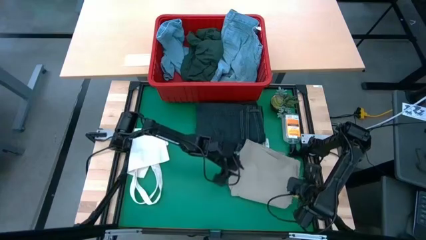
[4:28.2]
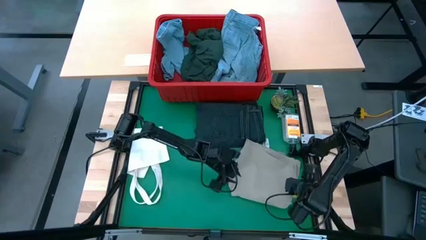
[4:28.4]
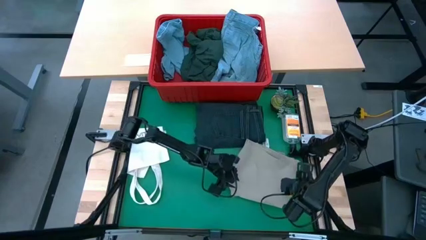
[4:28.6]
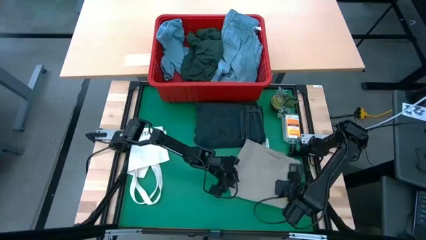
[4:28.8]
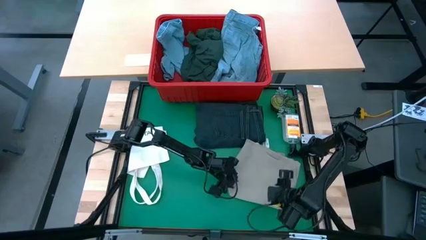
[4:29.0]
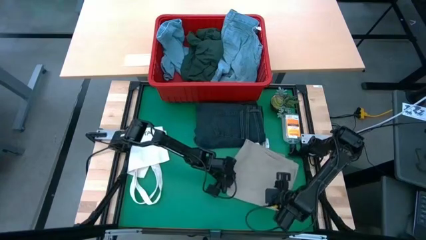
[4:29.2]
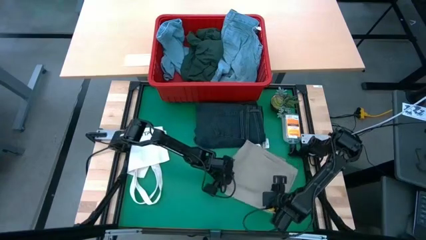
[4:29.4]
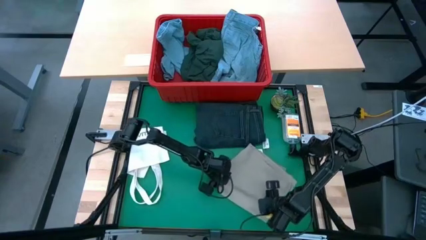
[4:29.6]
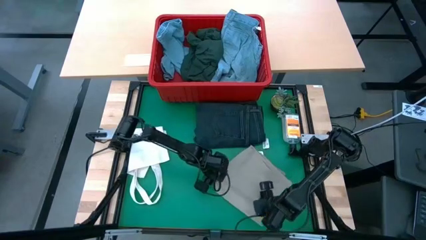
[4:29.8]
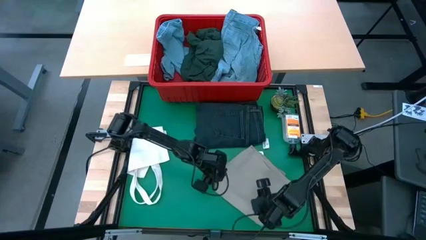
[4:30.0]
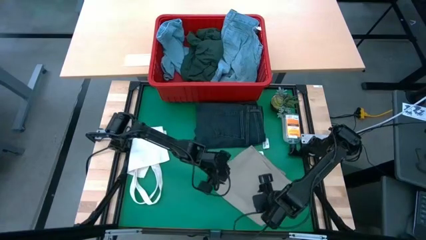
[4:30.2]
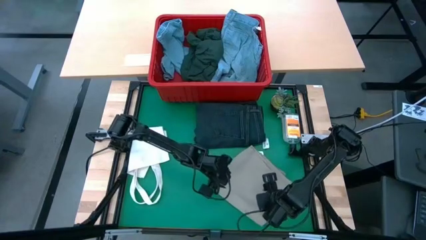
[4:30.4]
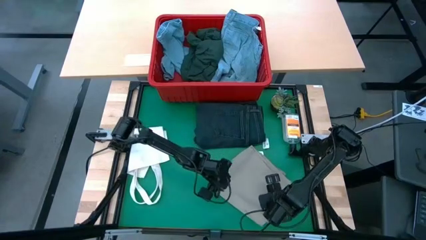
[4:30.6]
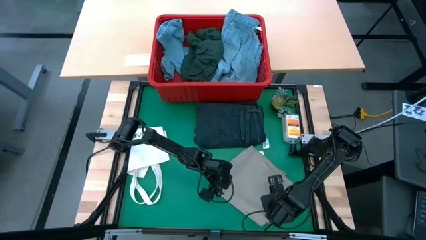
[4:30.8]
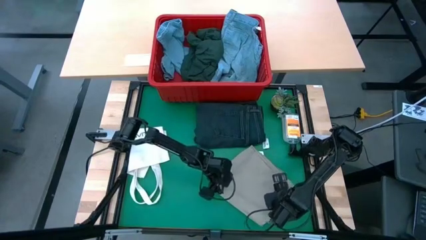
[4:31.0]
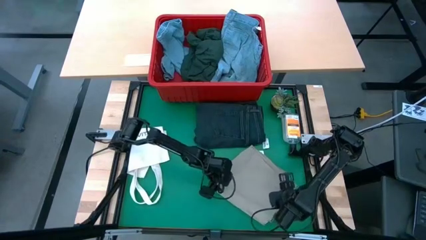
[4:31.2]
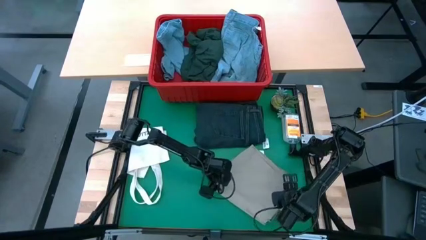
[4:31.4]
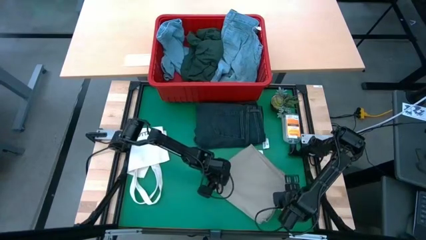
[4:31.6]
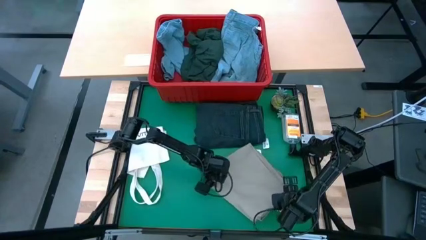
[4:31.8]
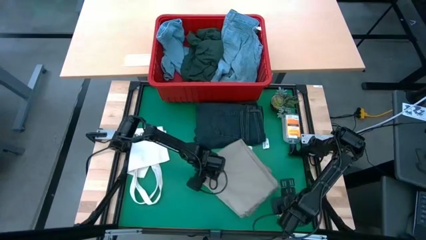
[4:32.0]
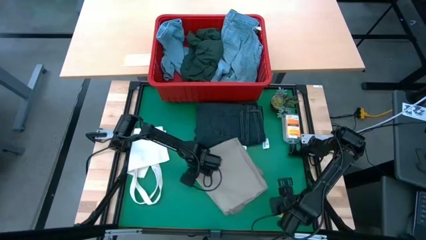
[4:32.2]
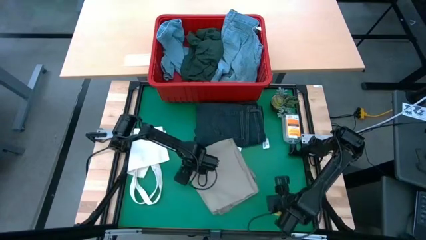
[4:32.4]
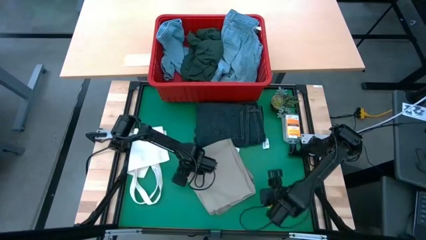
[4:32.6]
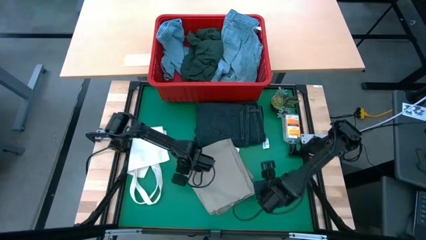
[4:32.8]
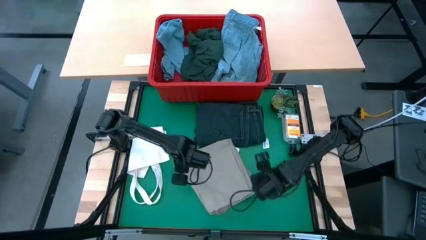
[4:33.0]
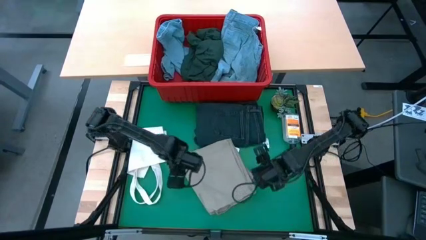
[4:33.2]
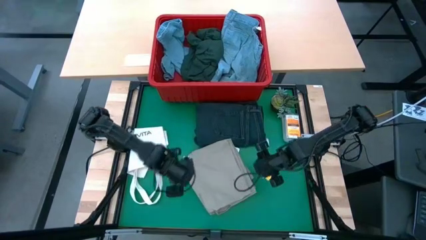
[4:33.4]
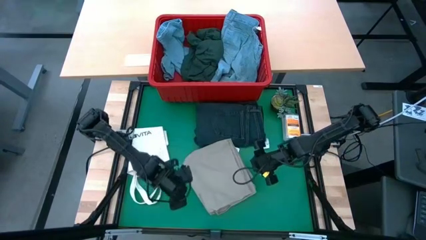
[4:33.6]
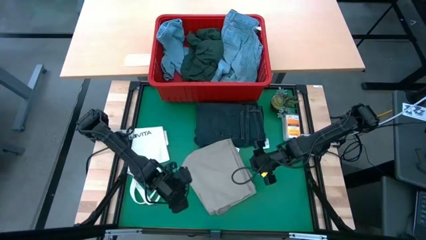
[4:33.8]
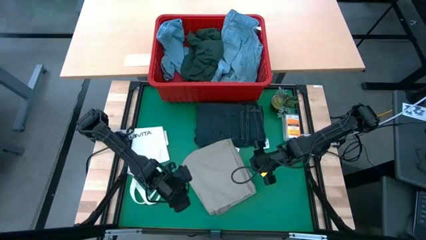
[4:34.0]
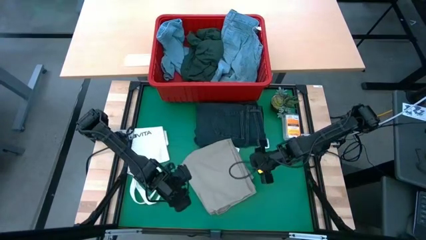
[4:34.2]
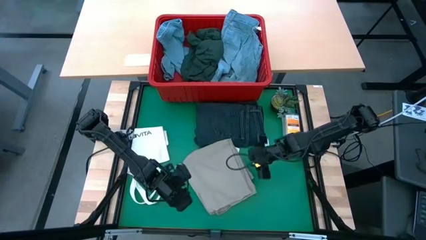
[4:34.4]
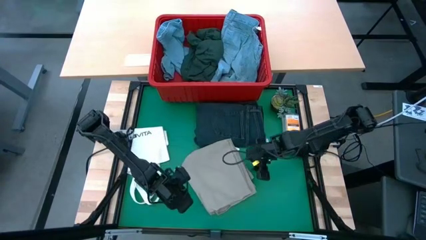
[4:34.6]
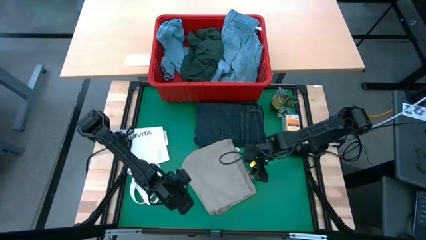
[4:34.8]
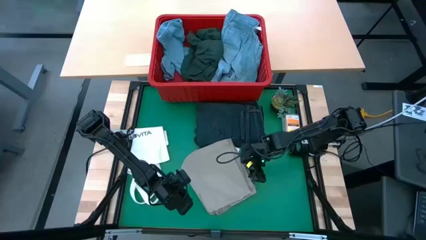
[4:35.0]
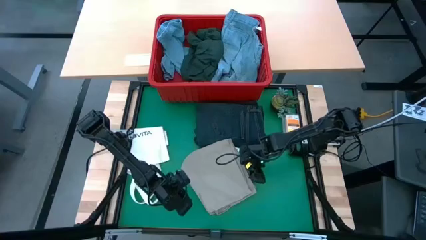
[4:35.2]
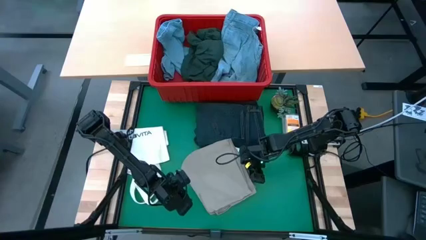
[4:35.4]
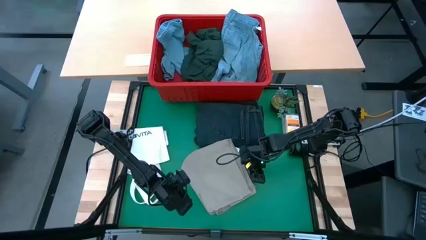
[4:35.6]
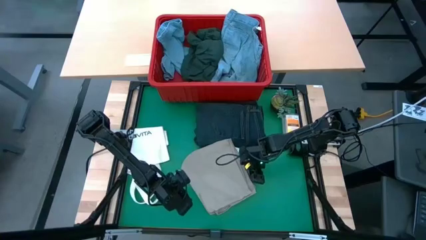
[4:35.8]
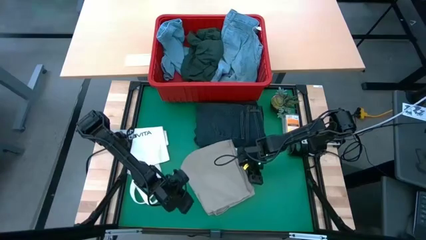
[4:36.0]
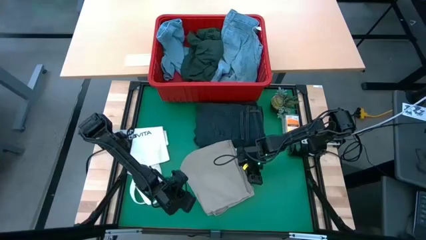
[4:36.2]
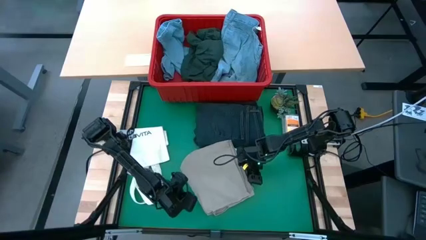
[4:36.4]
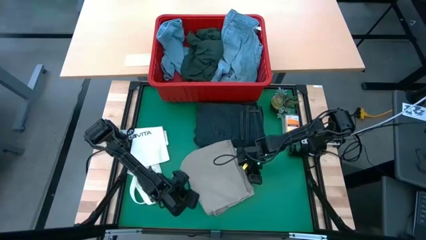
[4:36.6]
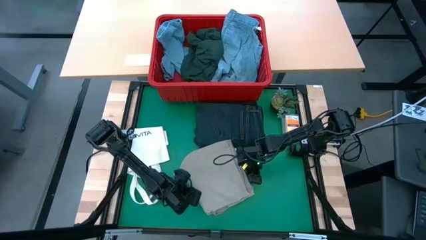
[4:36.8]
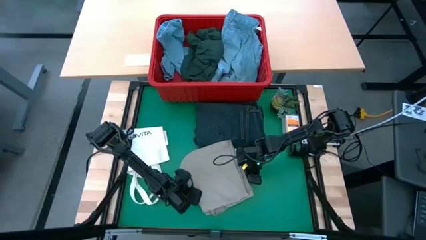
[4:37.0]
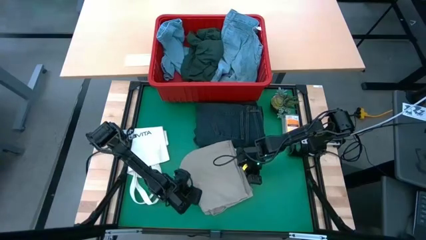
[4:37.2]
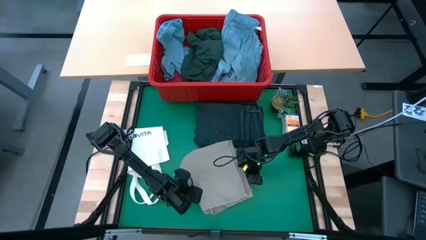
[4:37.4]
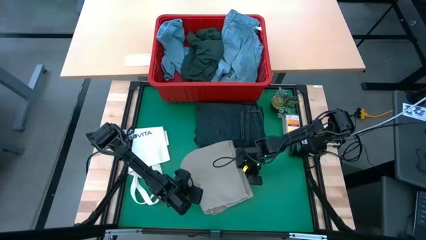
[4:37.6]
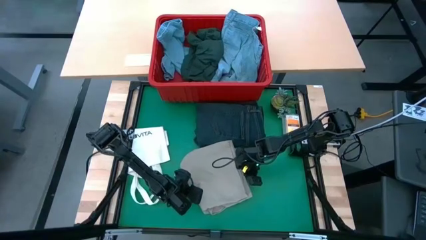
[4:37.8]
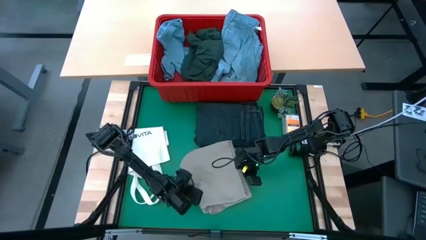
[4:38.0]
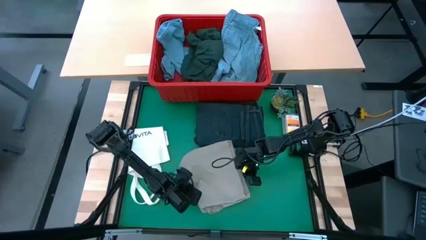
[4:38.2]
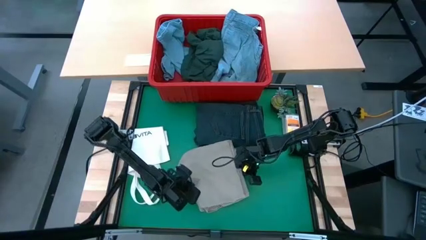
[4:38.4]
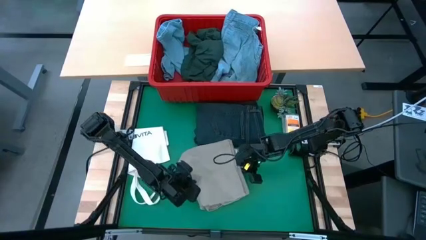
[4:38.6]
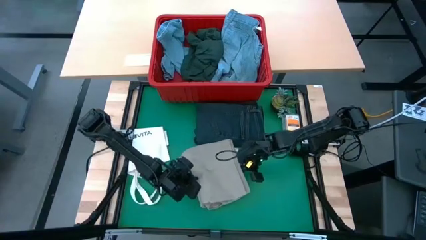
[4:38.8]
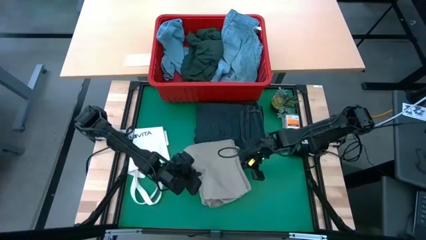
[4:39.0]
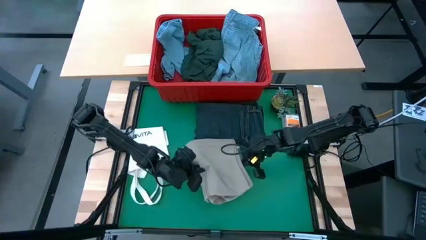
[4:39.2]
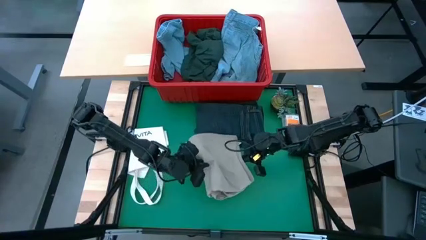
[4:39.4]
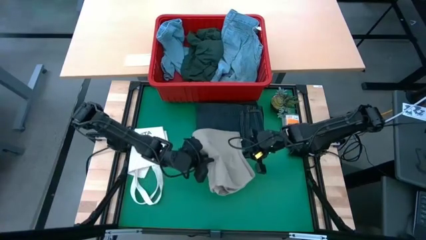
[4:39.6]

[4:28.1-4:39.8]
Task: Fold laundry
Stack the brown shorts on the blue pants

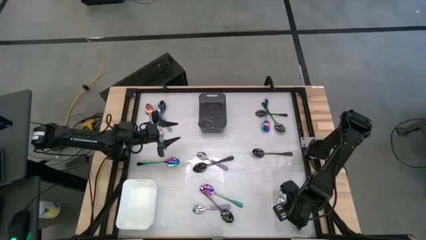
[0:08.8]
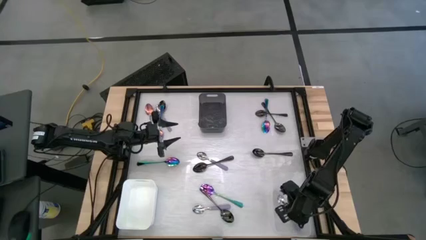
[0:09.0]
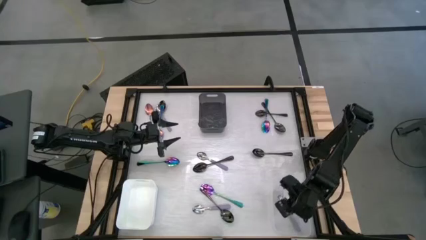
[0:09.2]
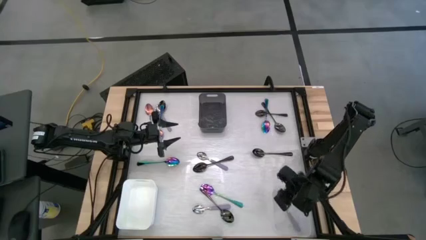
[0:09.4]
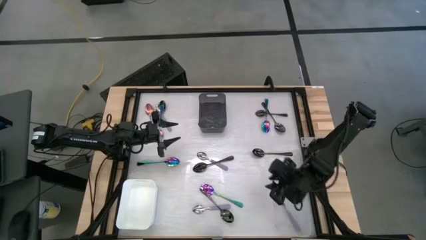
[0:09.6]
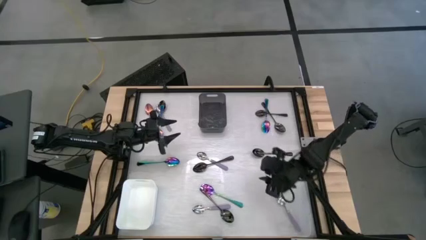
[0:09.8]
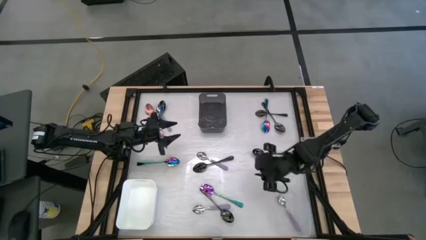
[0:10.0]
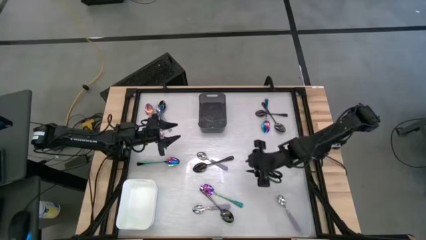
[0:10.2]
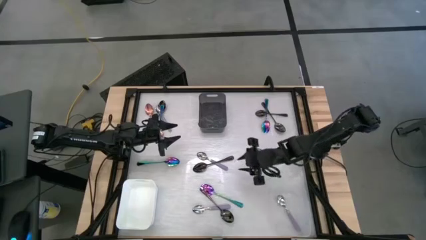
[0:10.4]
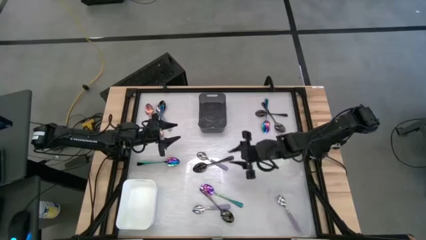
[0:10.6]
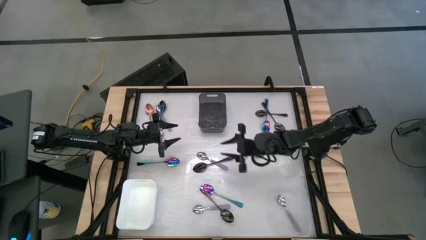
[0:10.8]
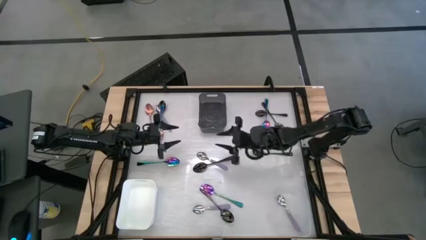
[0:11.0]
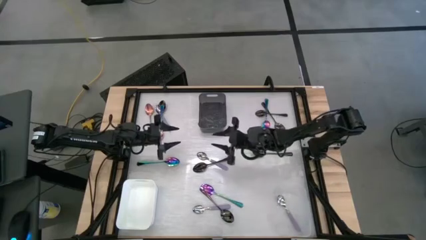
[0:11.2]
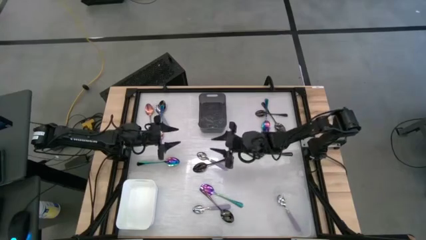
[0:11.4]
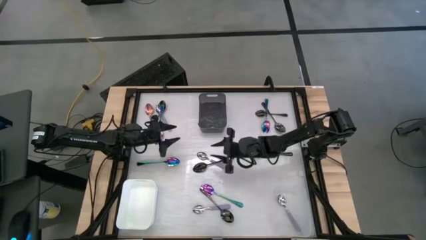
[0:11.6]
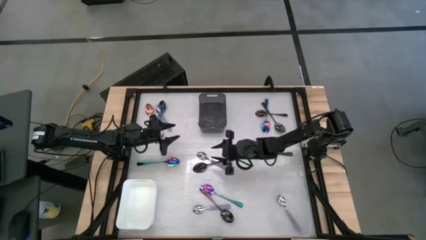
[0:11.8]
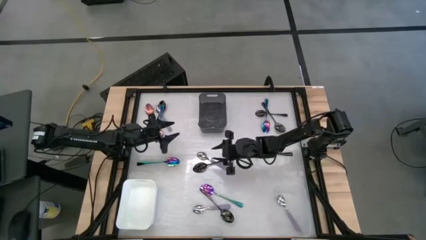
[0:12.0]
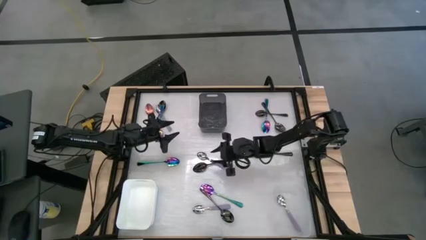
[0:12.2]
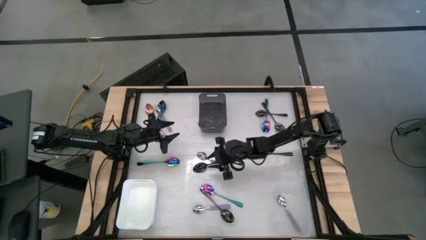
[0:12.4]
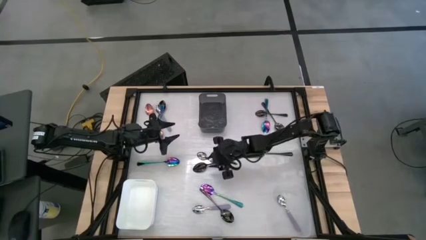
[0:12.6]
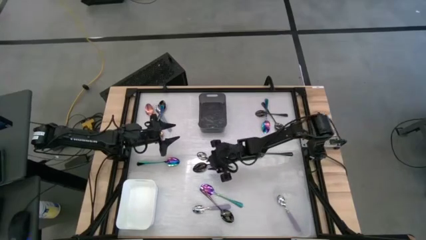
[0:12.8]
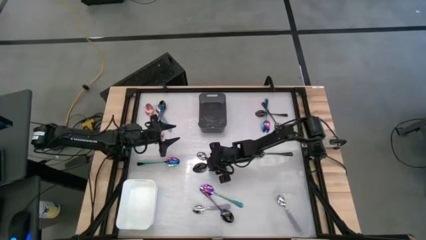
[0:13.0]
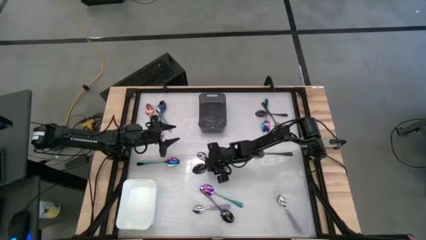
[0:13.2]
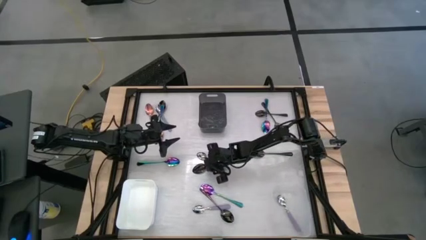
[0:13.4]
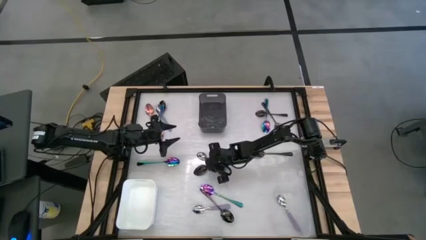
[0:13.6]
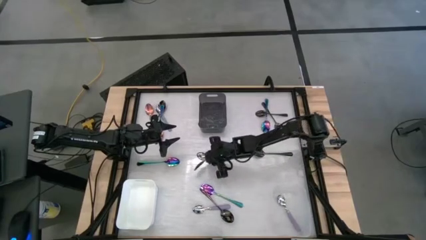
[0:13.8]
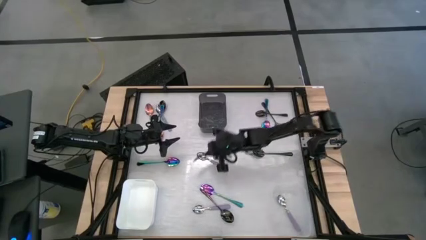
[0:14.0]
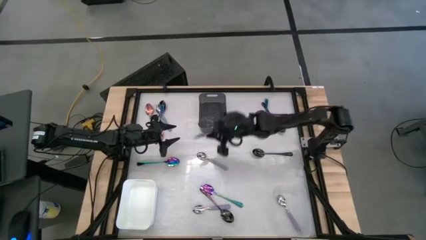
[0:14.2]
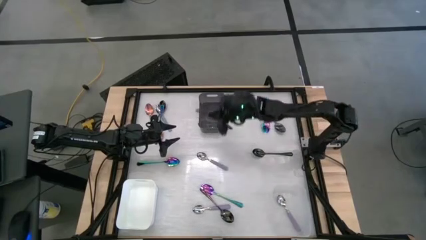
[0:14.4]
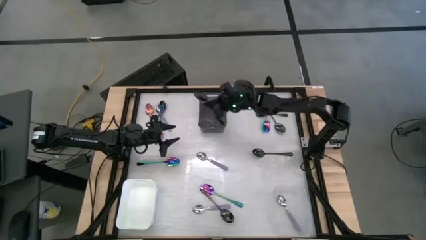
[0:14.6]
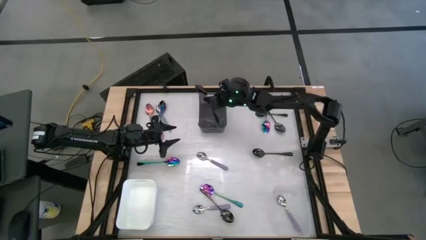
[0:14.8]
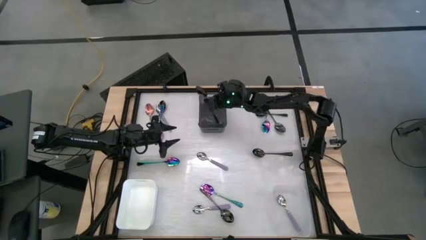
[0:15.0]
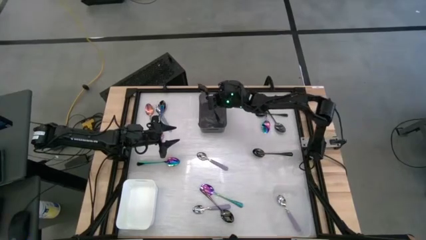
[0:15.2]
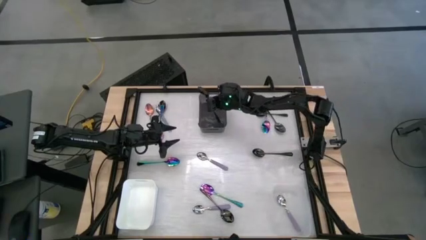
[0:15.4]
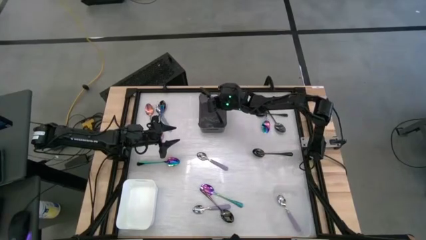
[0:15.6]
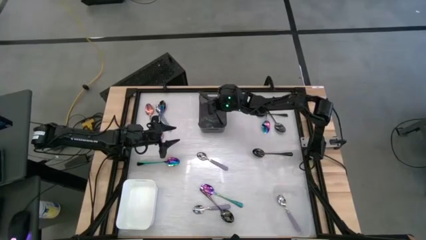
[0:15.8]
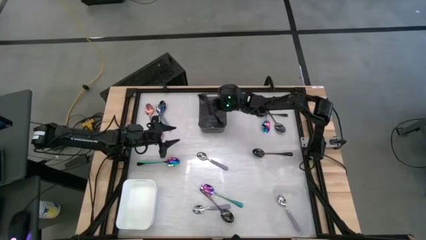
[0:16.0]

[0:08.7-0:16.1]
Task: Sort silverware by color (type)
Put the black spoon into the black bin
